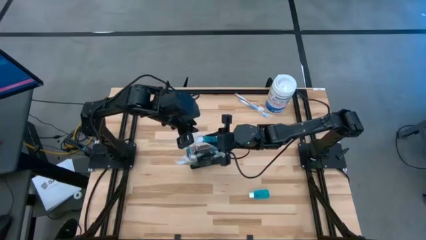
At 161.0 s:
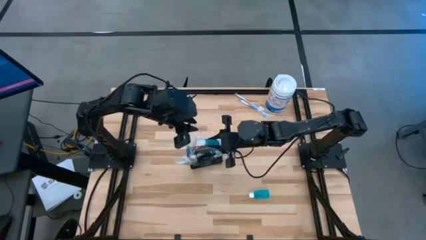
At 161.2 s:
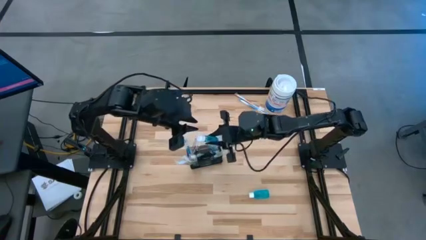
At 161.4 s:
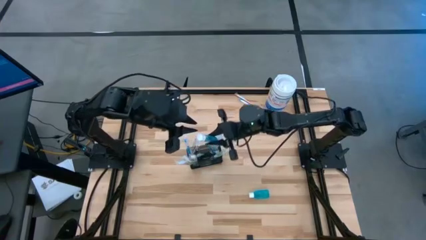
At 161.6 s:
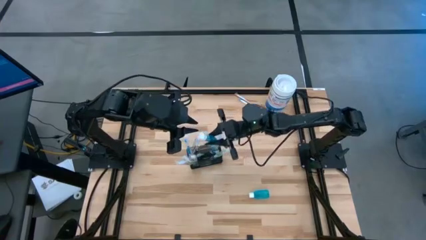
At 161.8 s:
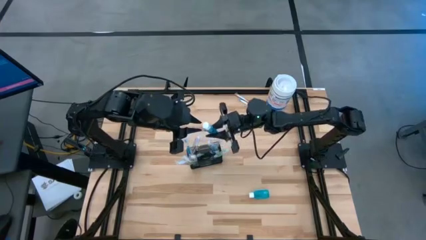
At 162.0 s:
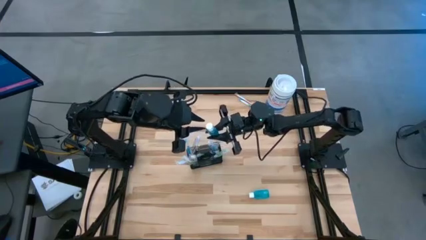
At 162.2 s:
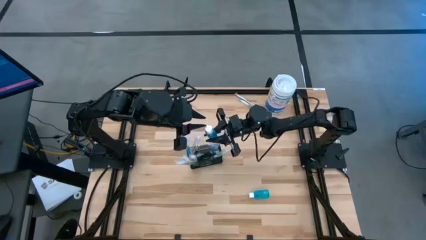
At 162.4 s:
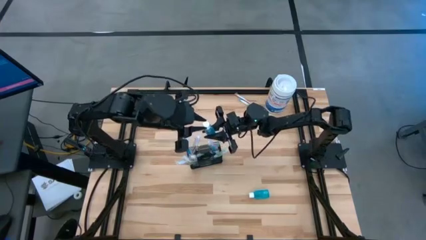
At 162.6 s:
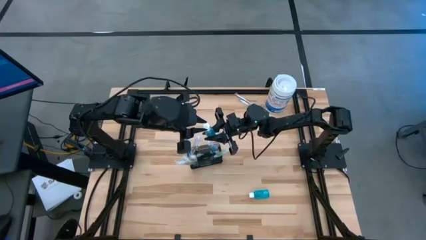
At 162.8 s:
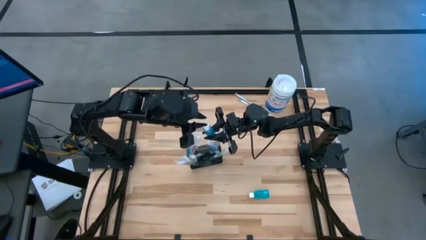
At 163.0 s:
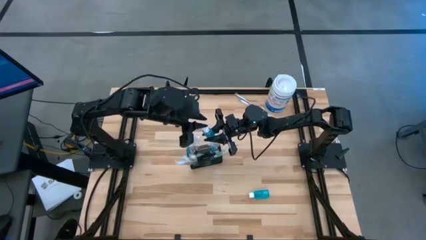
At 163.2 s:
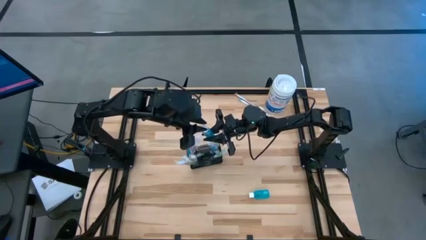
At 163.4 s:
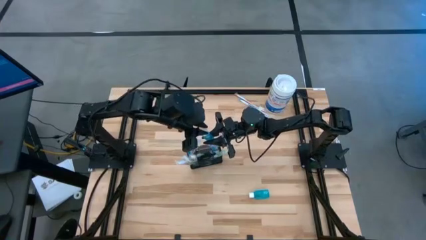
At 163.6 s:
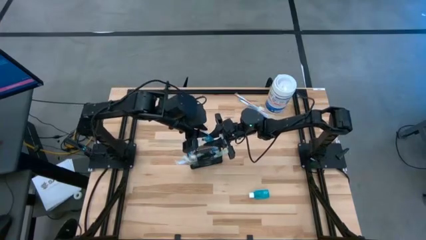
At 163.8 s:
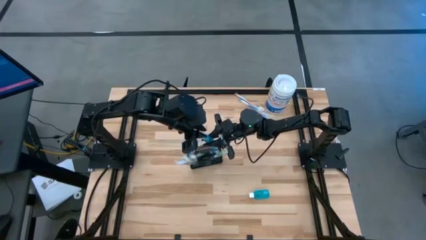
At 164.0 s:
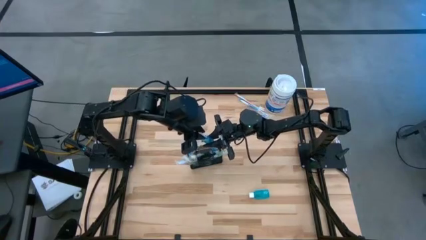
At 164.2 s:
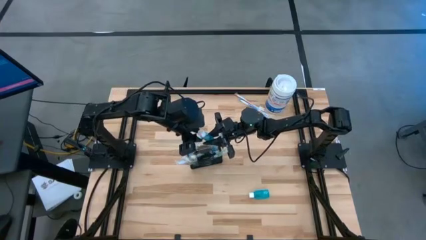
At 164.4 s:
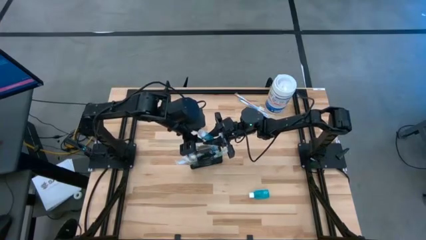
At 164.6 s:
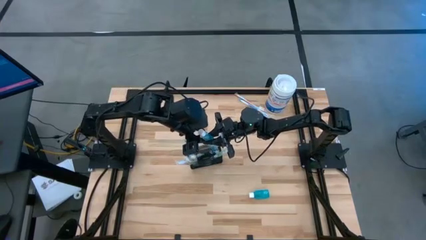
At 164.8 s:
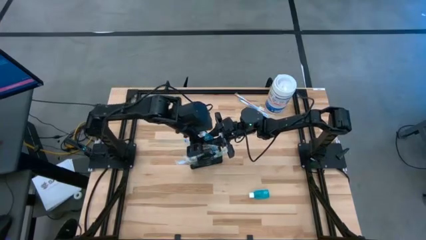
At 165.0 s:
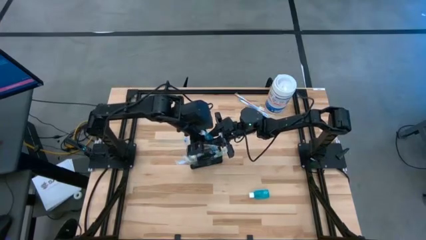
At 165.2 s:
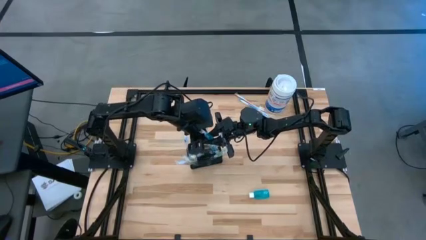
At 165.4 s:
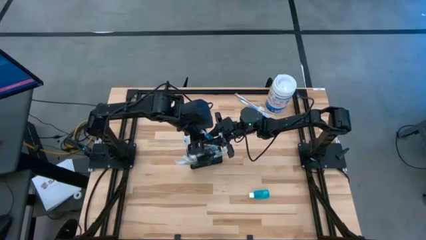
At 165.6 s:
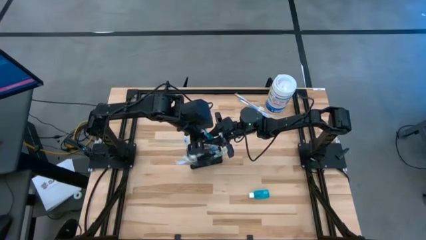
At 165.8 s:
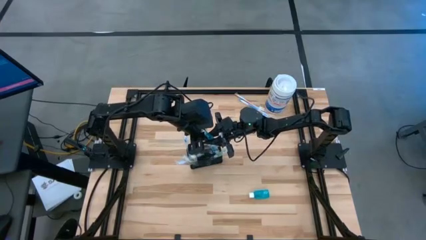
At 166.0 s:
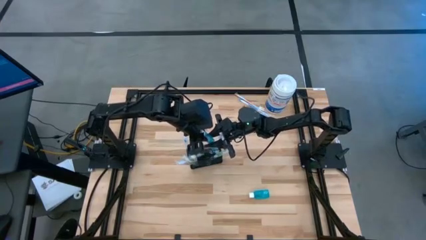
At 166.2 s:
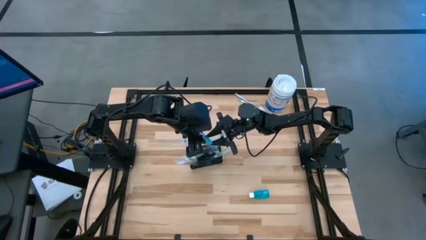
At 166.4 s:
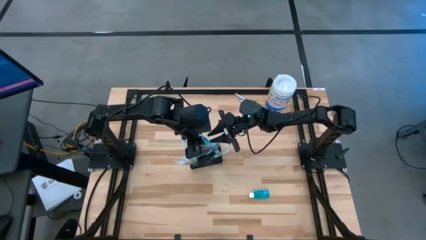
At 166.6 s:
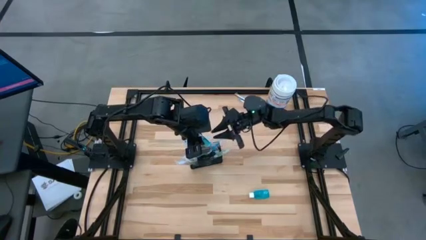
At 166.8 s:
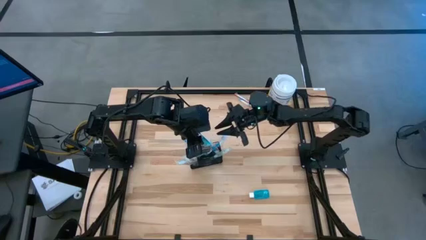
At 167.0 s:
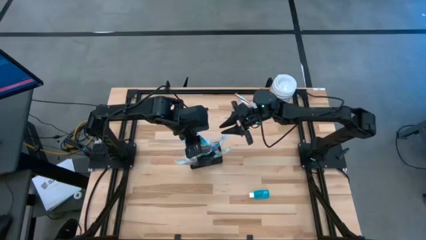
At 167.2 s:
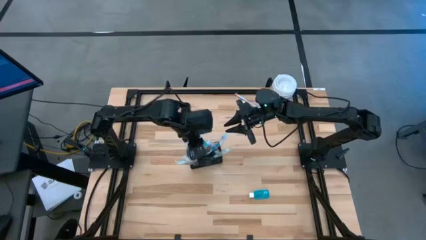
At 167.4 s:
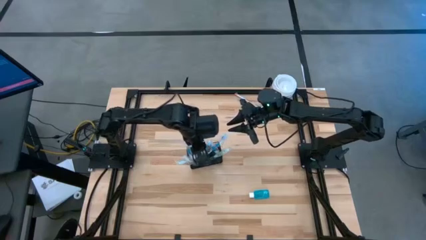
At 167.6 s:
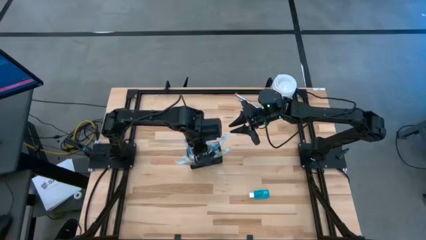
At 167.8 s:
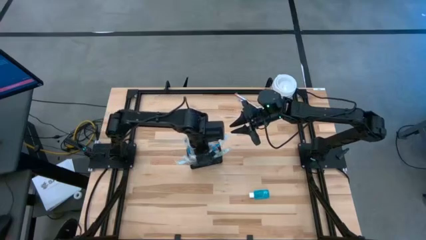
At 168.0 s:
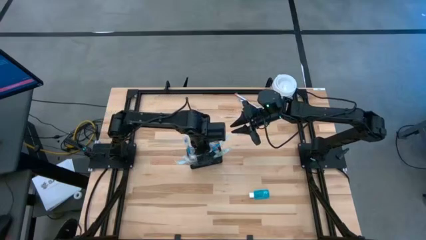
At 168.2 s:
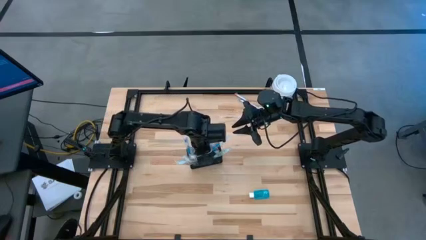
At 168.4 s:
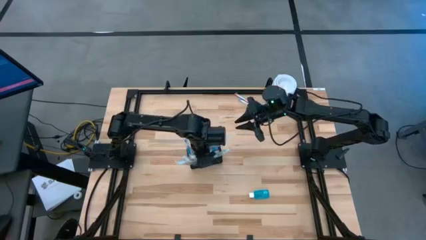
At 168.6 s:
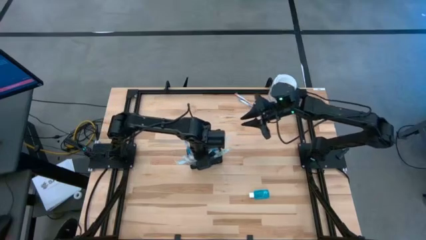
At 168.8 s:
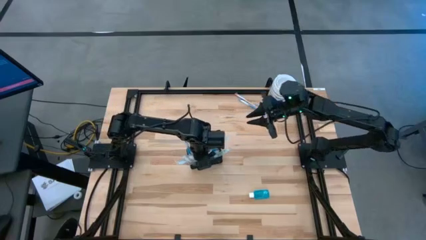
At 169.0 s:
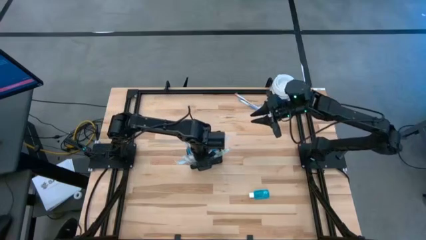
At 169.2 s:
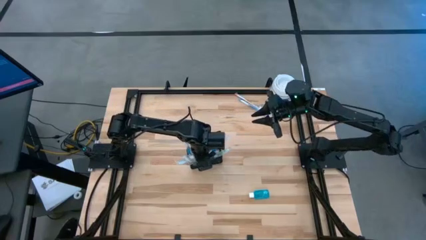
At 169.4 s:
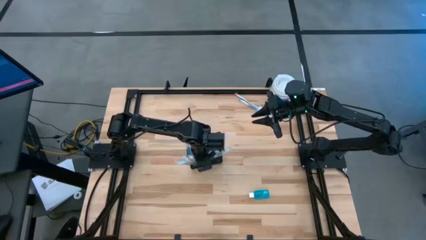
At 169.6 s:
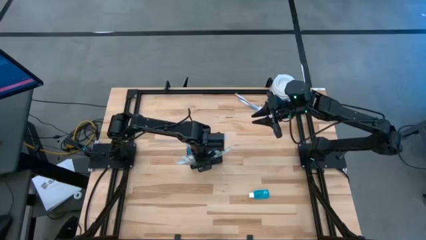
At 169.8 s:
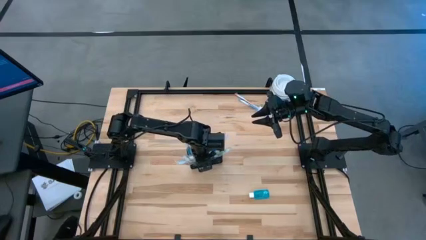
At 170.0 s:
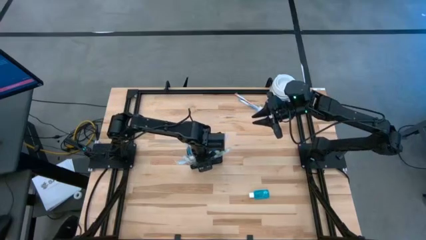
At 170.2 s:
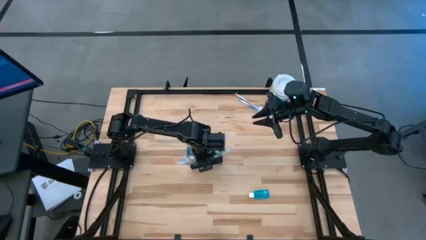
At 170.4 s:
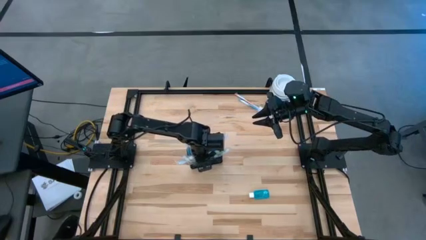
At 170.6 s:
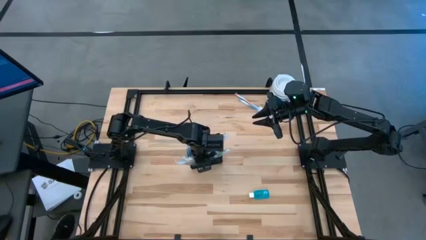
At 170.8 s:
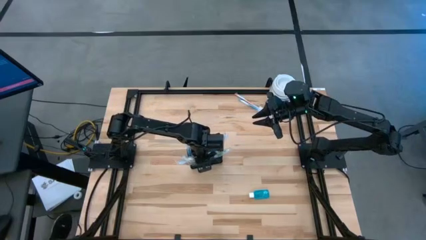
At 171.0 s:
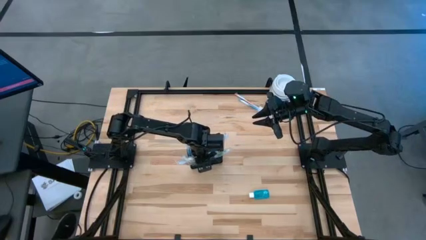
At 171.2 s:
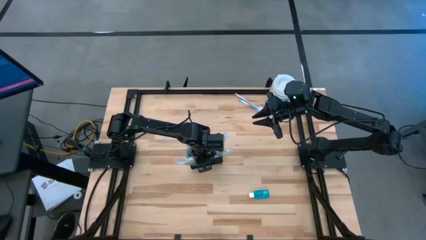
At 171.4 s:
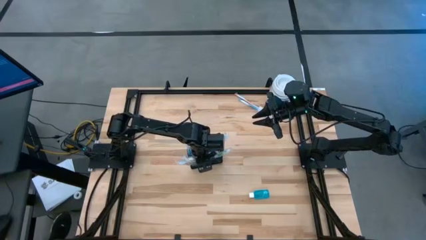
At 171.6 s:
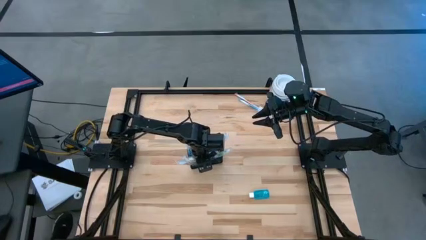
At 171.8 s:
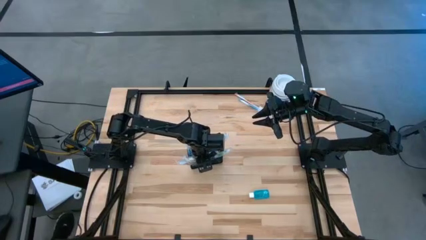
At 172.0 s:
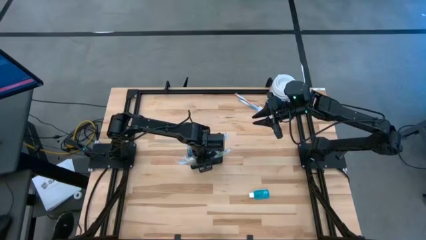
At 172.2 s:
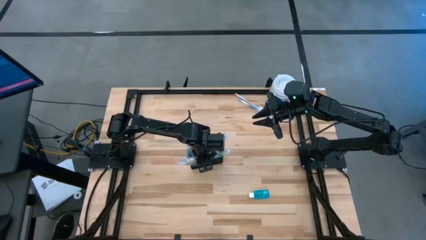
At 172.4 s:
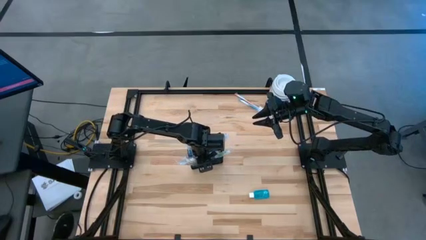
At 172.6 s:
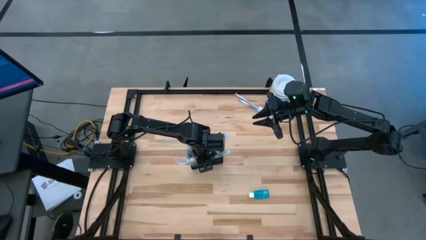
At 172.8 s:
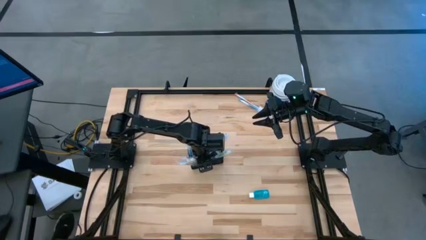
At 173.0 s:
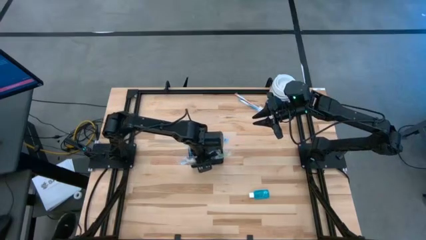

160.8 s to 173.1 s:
Task: Pick & Place toothbrushing station
Put the blue mouthwash into the wire organizer

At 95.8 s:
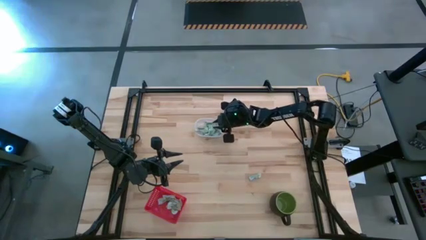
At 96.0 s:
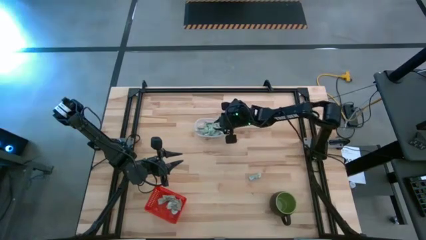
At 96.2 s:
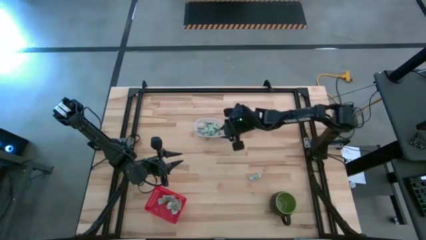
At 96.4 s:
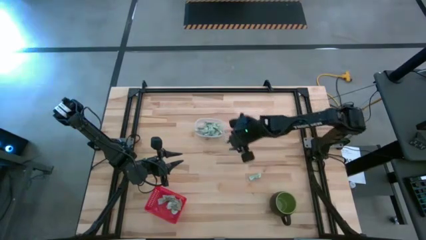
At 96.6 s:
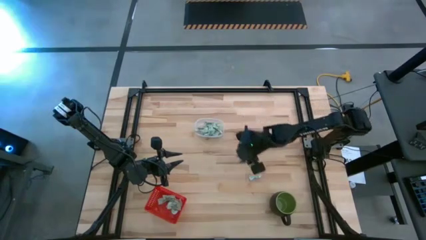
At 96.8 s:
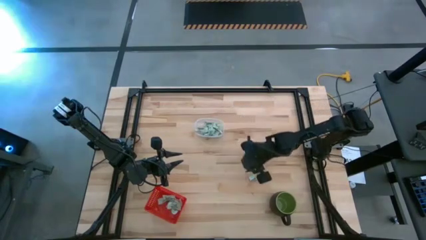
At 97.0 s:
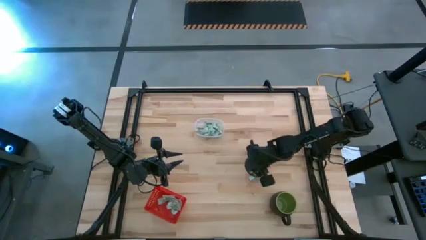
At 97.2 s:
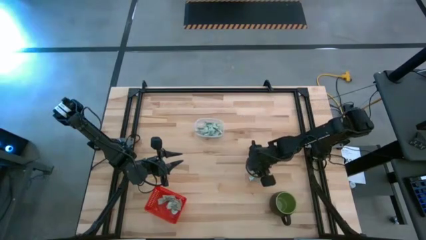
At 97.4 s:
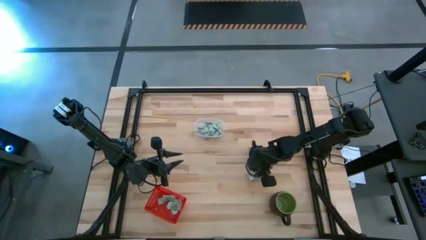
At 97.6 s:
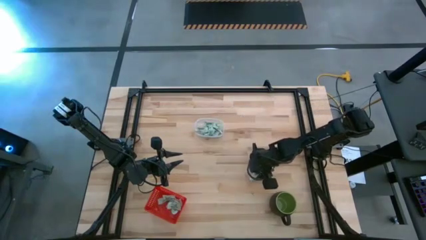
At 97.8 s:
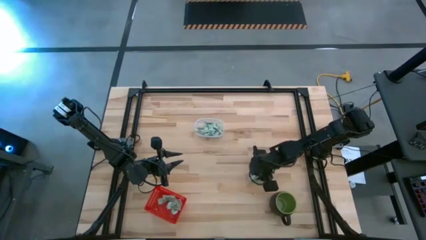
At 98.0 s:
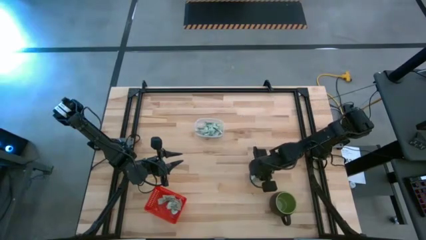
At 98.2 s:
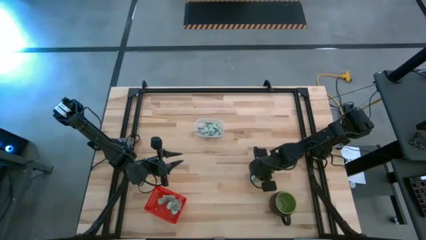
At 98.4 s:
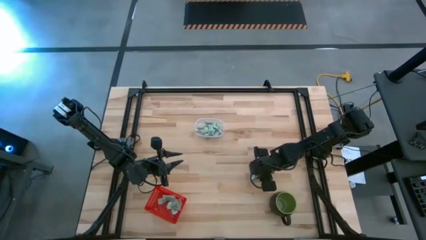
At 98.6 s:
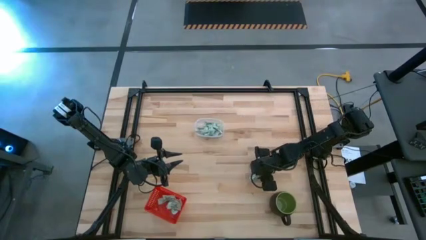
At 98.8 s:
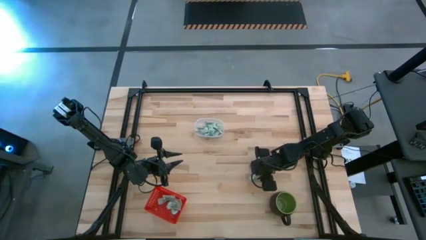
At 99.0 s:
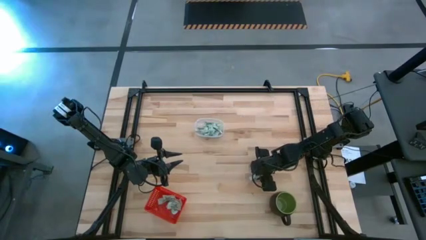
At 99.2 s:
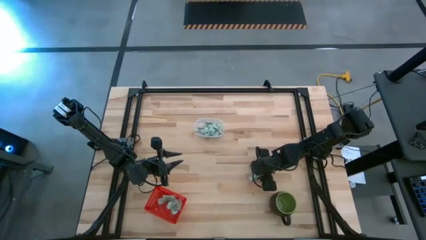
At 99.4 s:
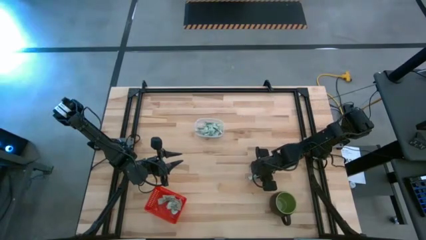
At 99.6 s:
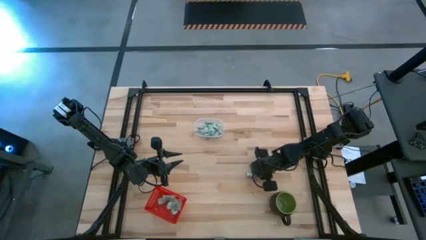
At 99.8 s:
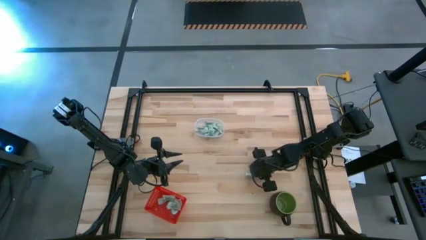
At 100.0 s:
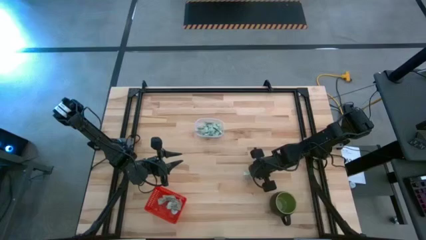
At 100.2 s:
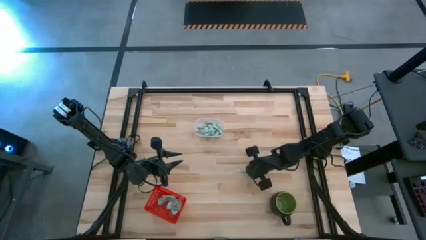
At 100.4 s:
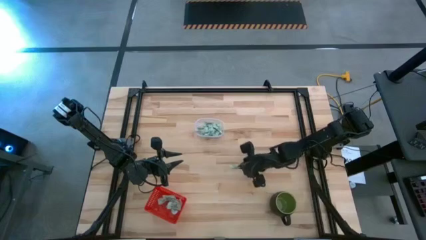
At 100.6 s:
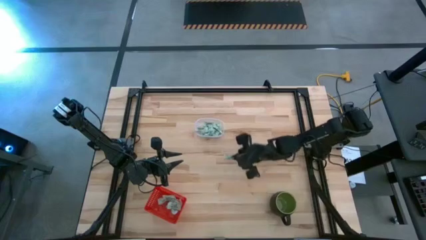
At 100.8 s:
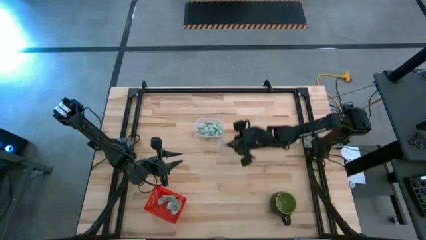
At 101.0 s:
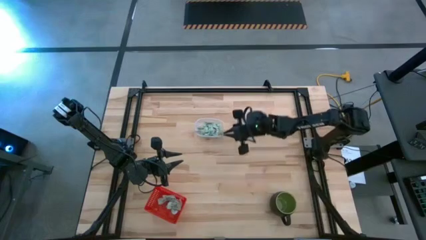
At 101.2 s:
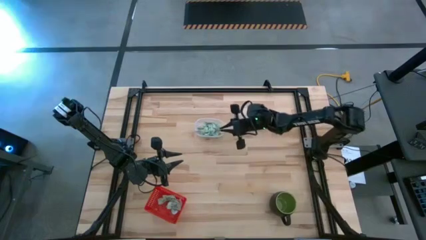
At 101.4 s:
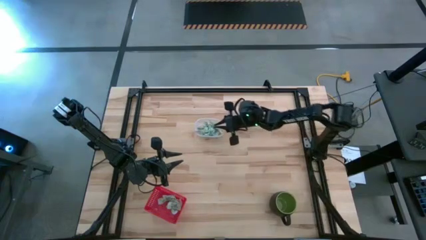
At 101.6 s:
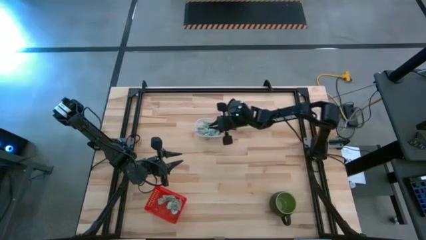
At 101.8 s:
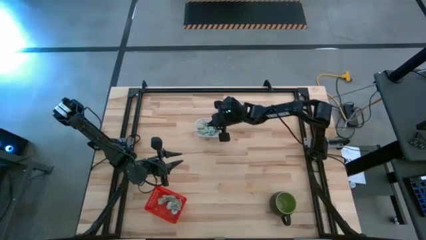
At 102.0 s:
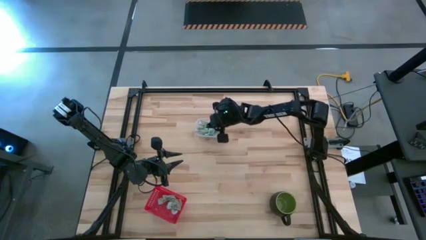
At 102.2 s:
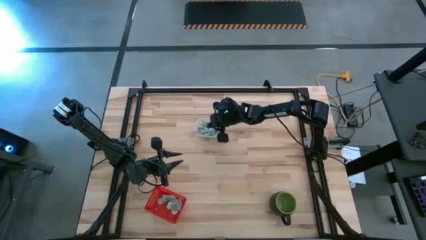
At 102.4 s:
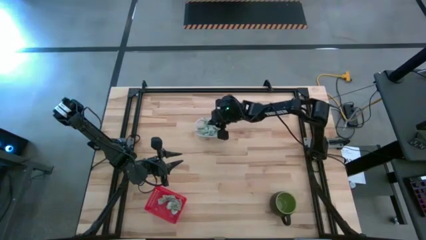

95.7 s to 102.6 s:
Task: Pick and place items into bin
Put the stevia packet into the transparent bin
